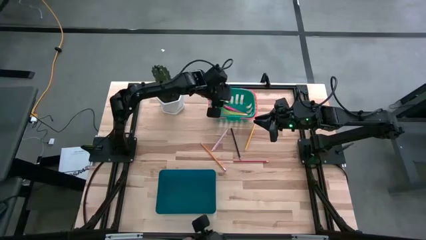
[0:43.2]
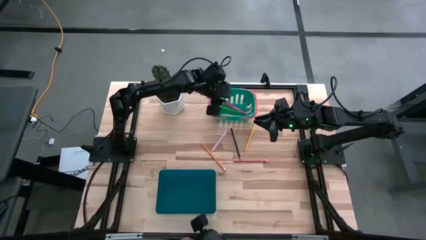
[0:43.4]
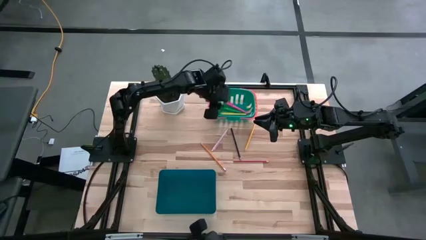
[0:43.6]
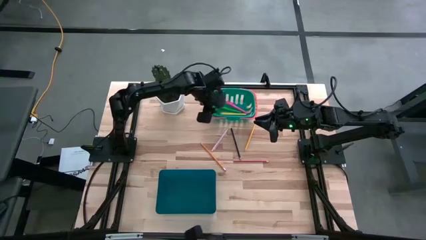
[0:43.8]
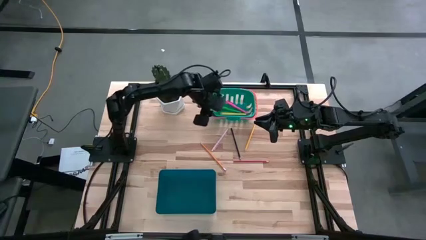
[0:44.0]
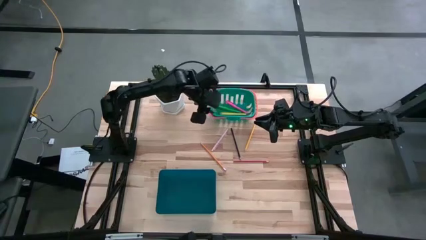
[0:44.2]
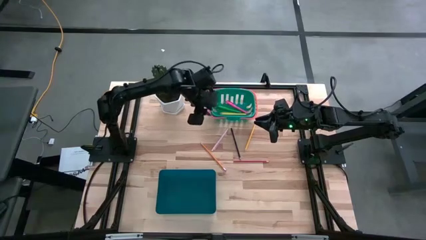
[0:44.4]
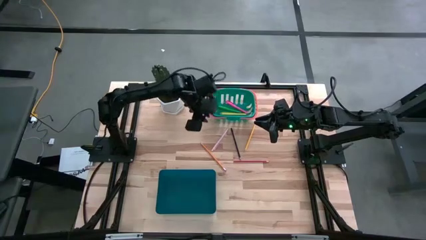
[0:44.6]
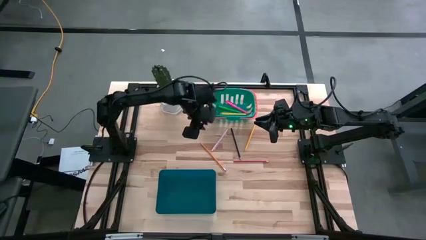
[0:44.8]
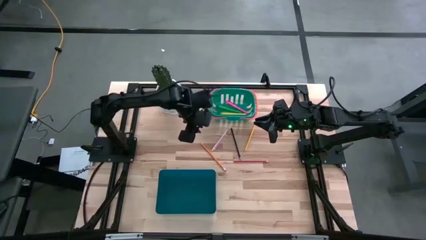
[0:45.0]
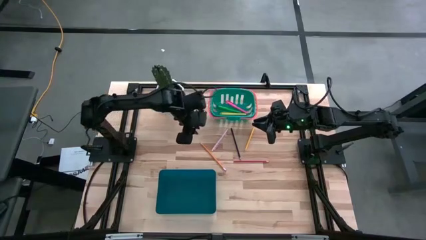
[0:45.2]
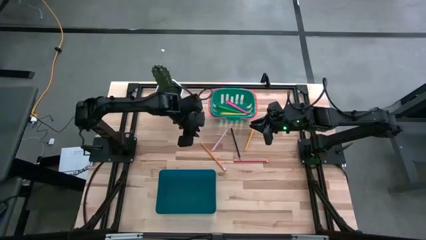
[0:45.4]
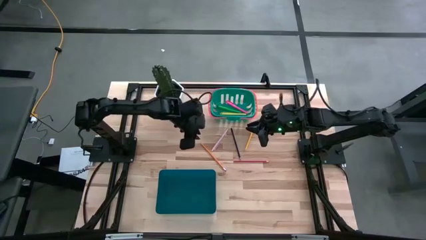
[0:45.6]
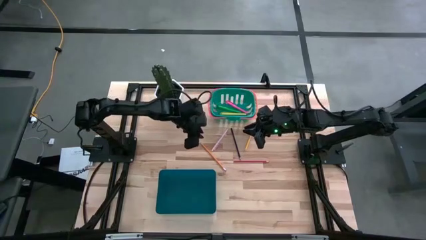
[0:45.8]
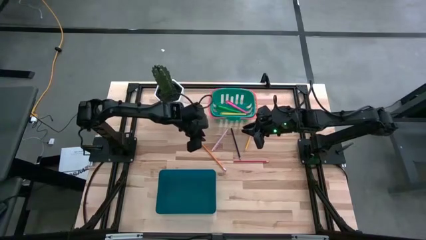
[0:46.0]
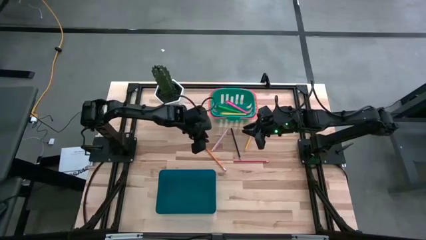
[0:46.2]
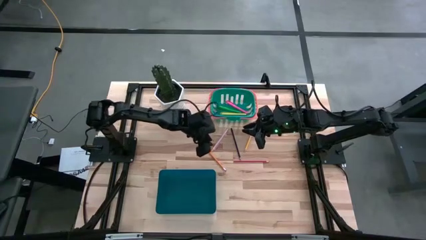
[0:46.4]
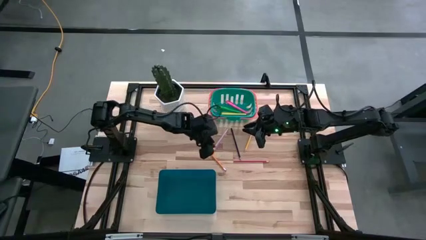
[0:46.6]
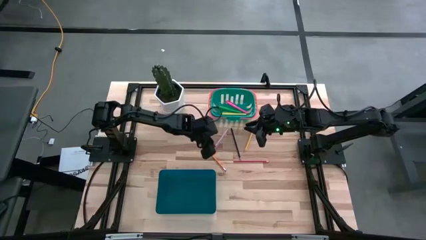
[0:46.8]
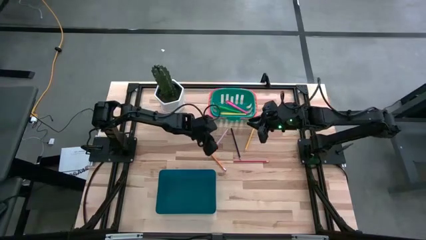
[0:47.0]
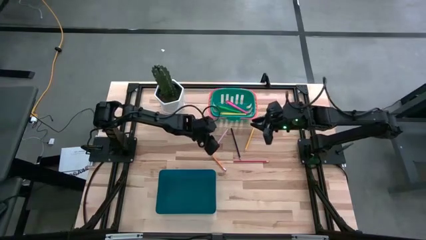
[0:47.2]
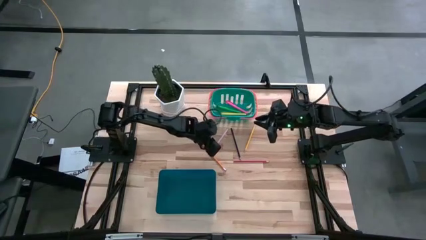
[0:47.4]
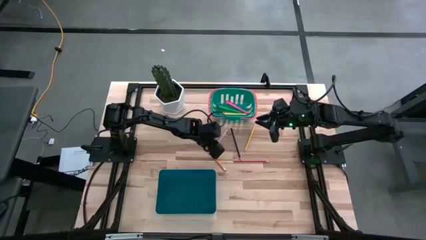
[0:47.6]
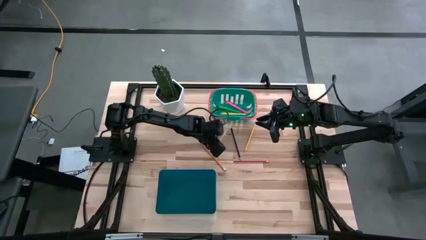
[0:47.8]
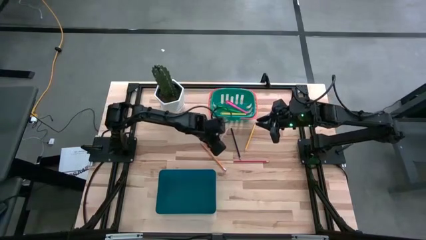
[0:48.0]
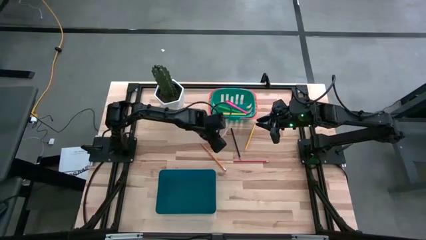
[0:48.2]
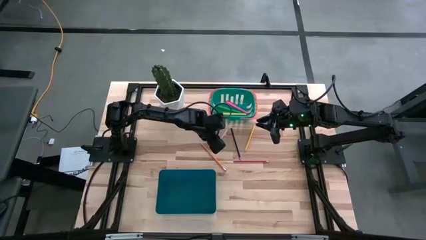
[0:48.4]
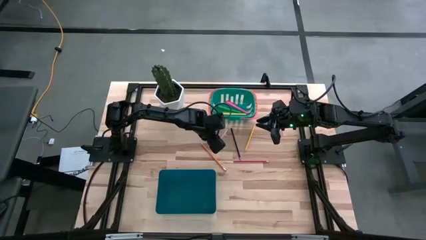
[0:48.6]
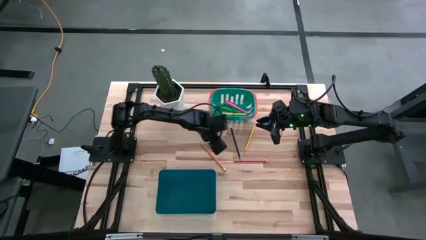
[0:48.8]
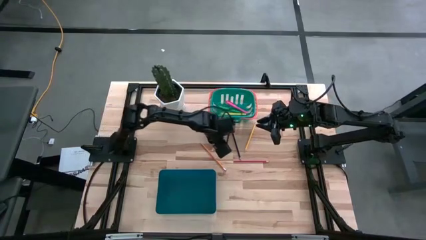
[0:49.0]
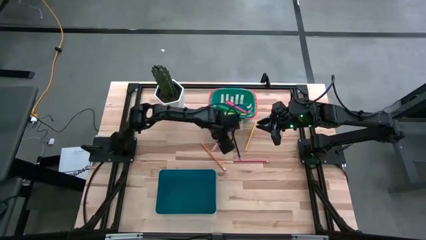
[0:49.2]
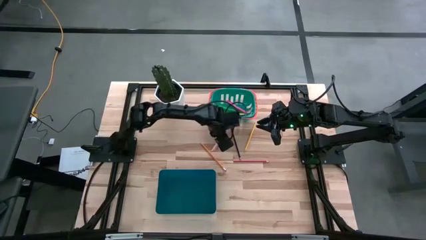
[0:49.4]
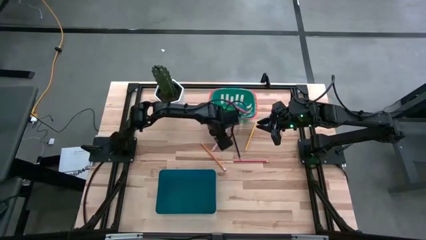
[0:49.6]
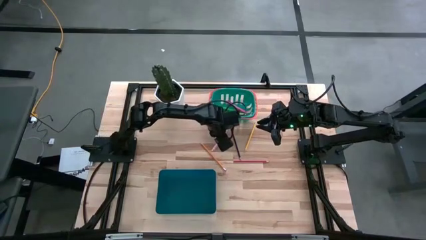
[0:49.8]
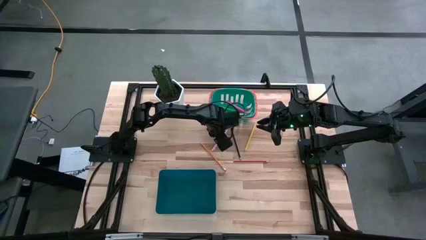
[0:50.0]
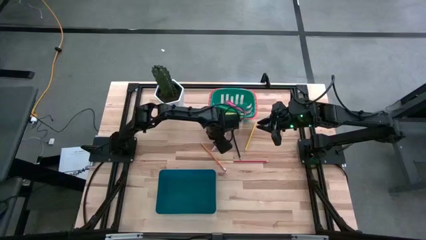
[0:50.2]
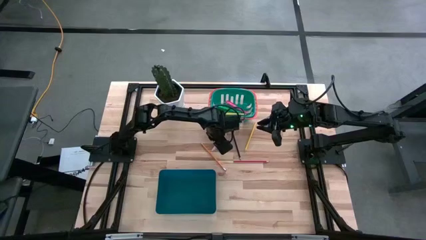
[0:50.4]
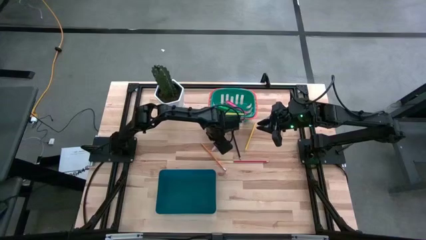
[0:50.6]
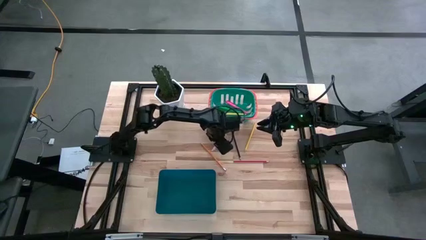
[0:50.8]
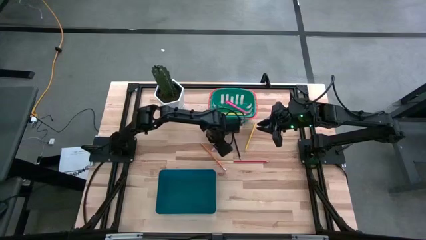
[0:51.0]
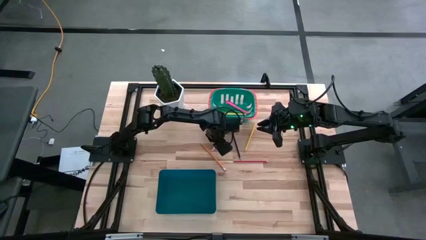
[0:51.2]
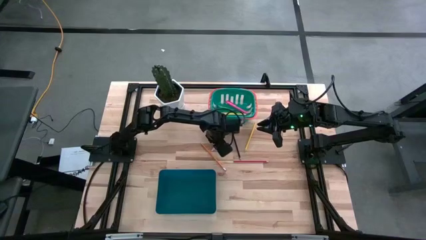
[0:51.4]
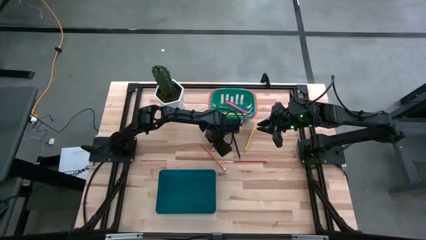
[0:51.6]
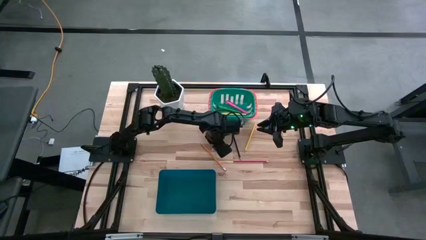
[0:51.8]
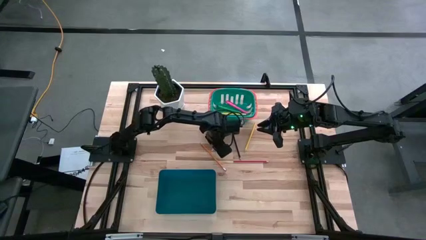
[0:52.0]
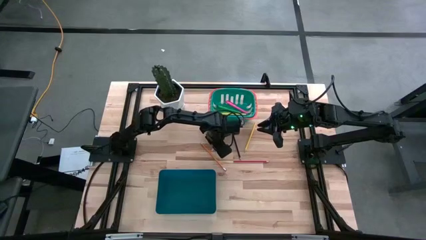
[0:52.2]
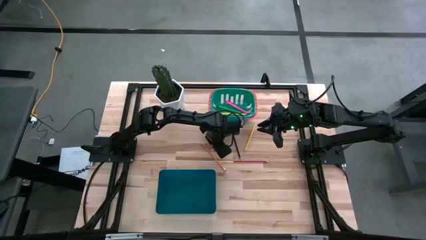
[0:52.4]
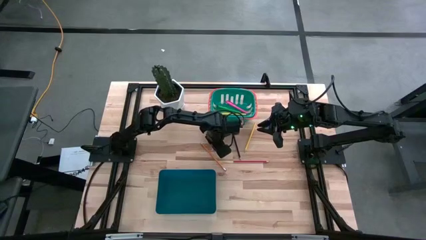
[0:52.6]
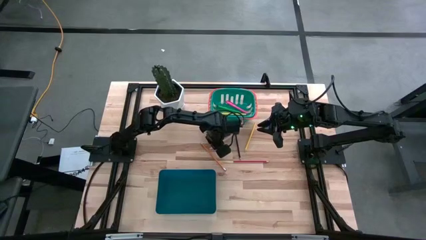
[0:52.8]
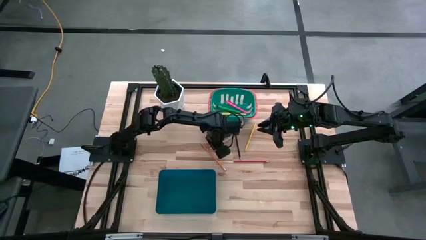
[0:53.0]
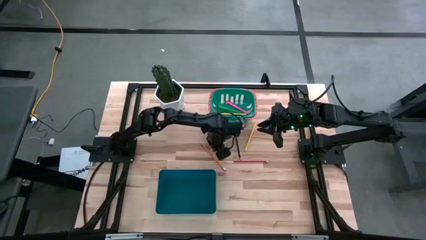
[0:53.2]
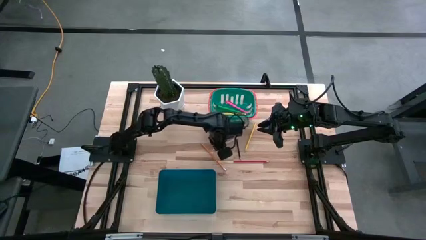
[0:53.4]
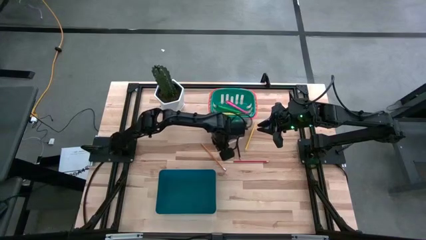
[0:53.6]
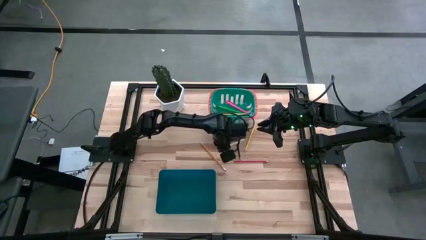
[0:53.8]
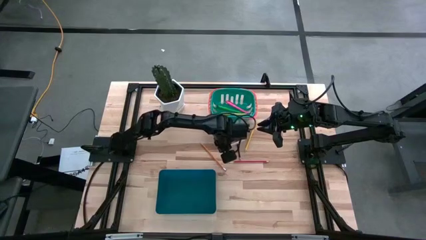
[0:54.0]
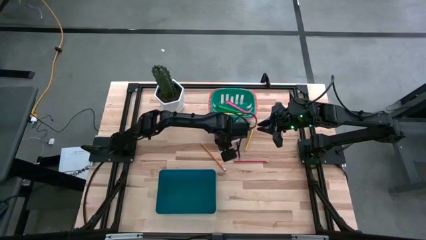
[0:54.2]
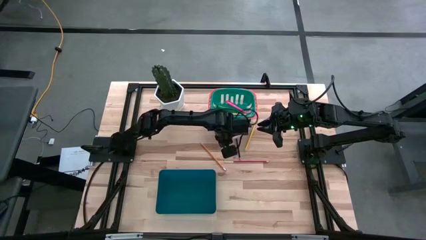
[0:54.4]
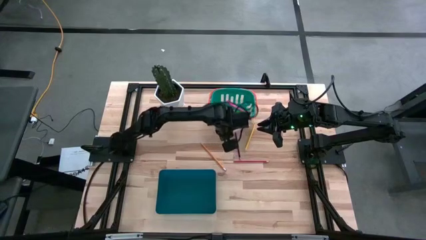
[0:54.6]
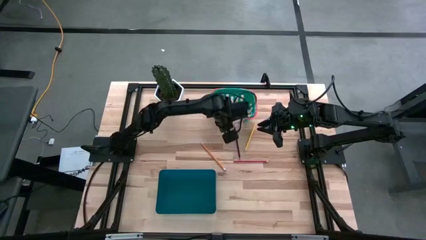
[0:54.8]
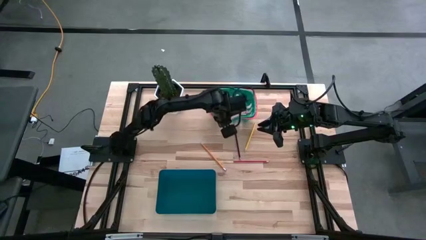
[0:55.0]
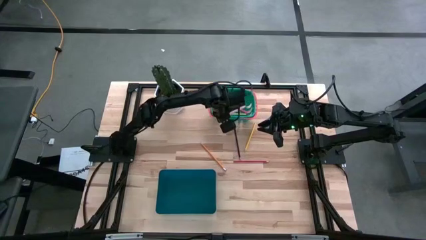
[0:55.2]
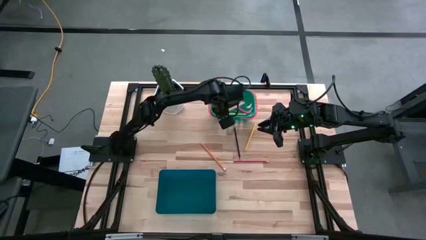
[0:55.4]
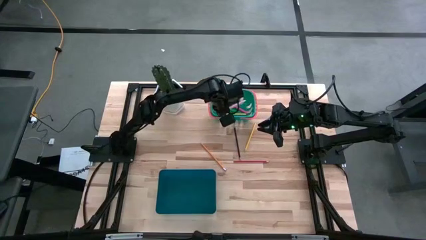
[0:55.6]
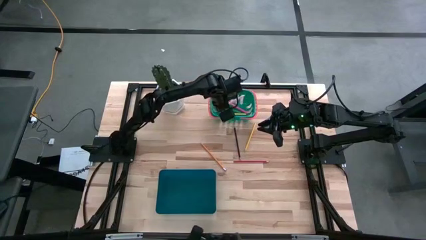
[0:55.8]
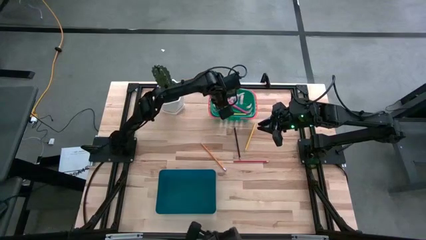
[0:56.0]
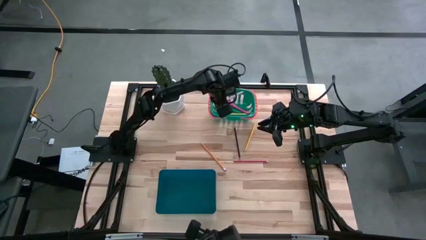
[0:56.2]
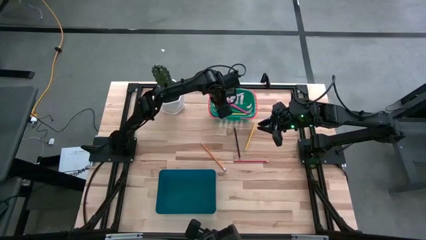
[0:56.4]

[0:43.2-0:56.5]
Task: Sort pens & pencils
Put the pink pen into the green basket

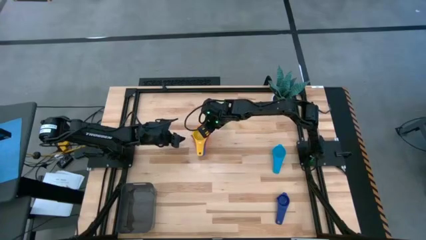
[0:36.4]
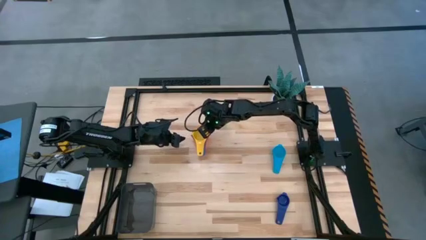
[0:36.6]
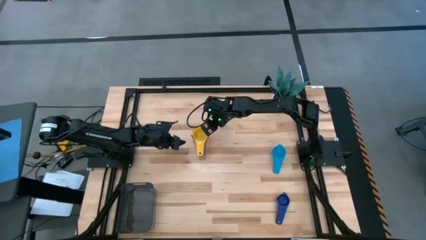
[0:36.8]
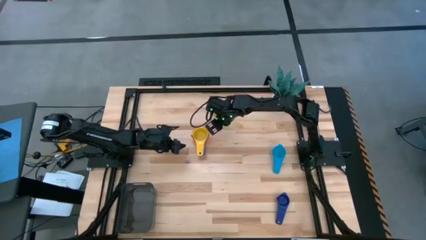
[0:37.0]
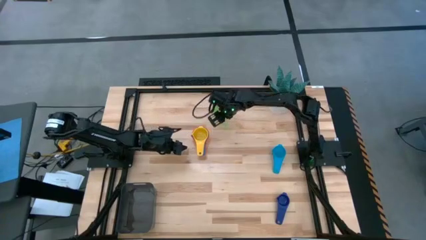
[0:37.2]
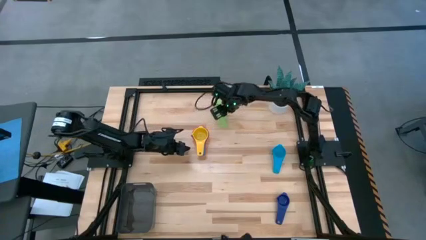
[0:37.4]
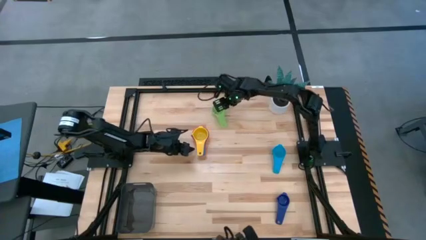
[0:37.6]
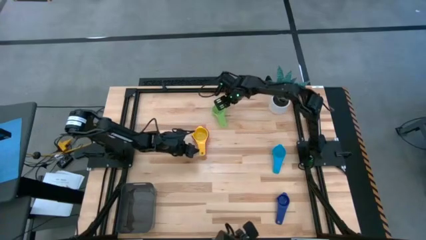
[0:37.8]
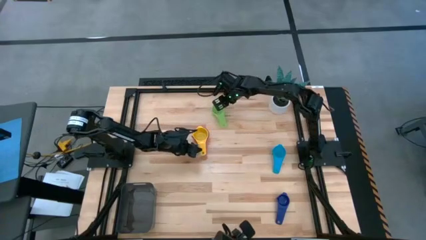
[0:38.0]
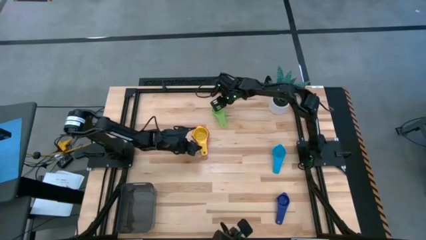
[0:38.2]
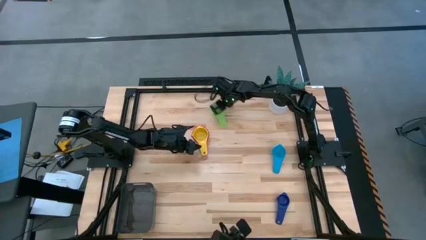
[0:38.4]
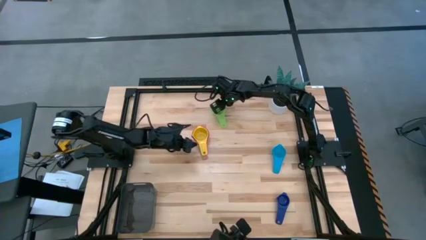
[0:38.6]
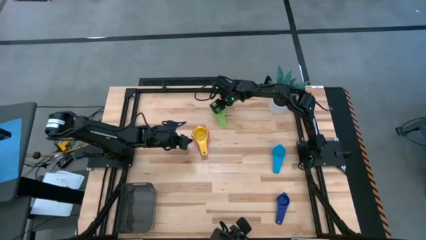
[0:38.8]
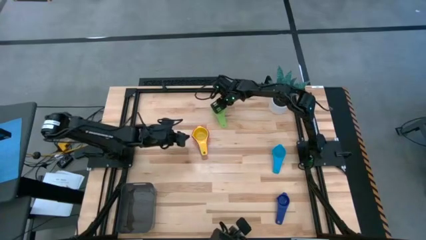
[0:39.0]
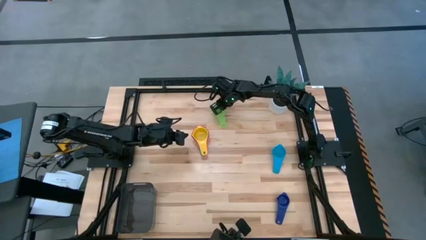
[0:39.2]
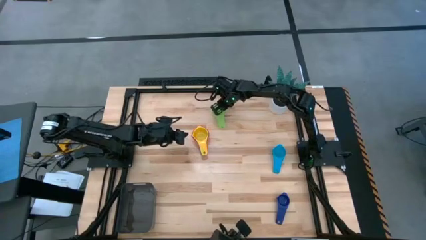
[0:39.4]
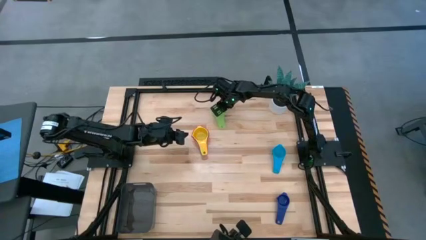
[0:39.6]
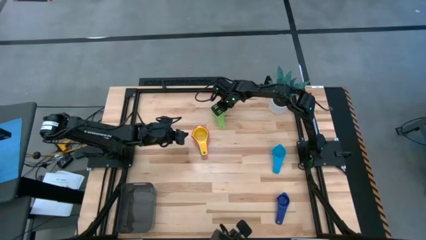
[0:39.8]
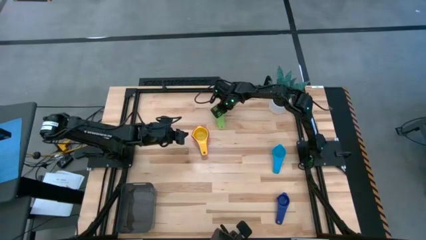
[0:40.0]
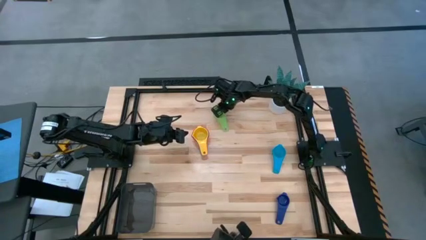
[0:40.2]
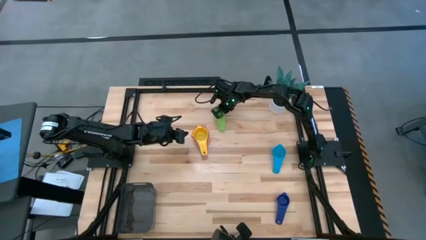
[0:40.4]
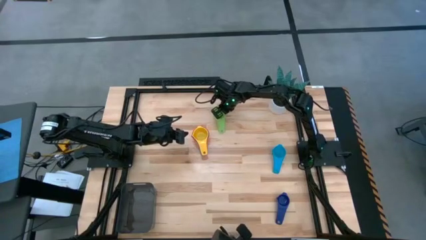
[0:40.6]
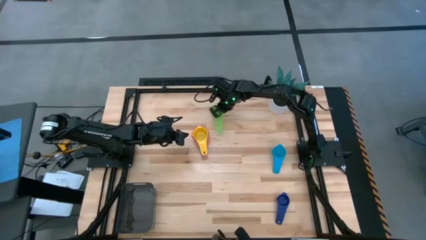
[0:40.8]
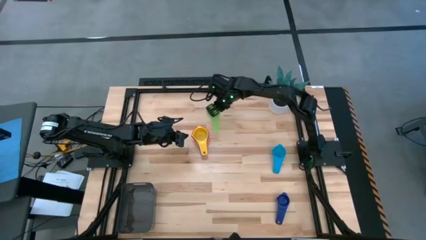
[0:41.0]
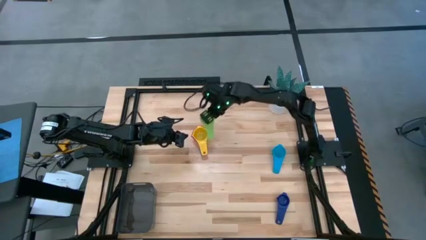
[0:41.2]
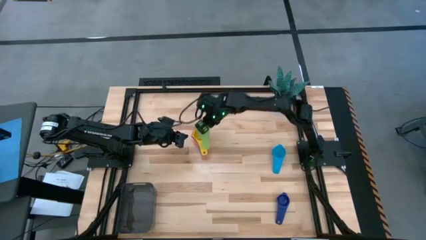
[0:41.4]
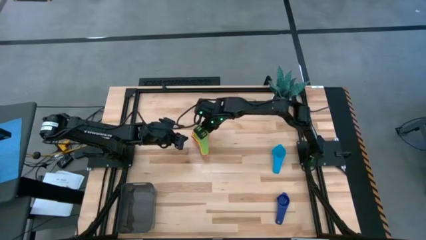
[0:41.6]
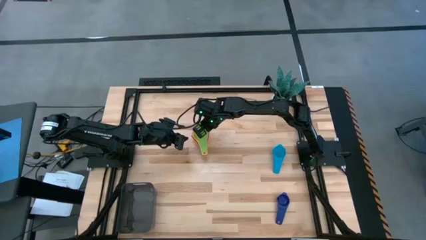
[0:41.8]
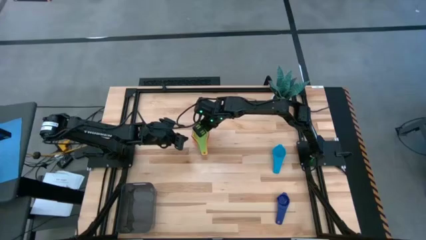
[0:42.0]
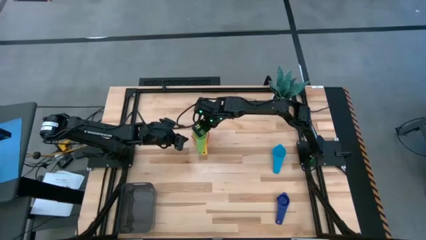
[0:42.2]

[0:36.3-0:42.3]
Task: Nest measuring cups in basket
Stack the green measuring cup on top of the yellow measuring cup
